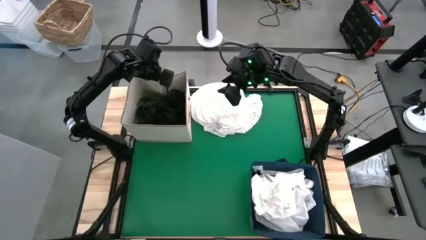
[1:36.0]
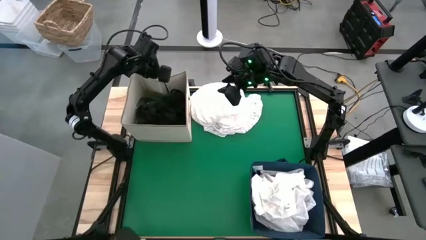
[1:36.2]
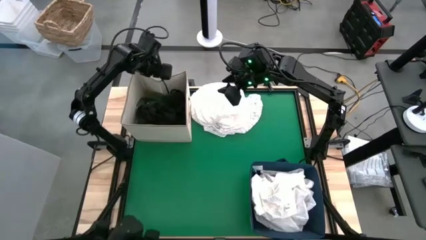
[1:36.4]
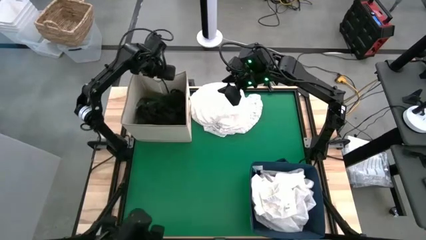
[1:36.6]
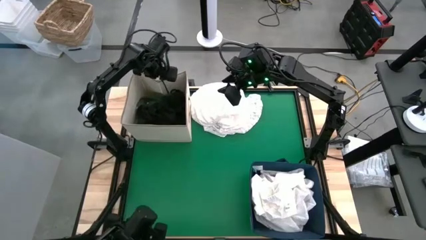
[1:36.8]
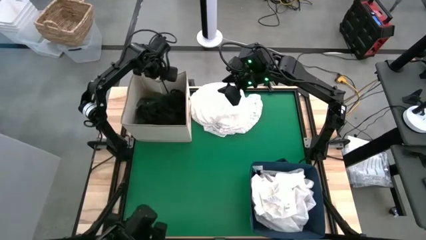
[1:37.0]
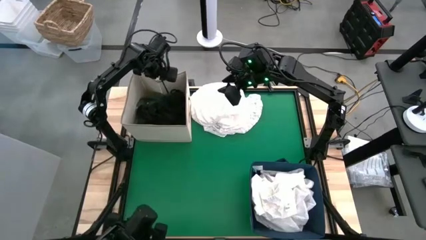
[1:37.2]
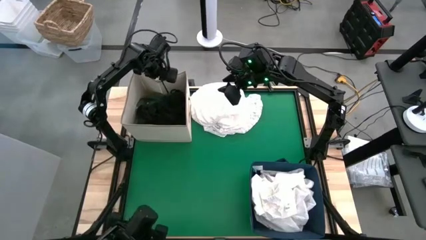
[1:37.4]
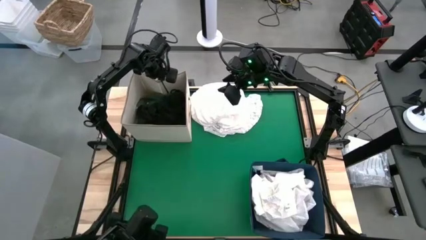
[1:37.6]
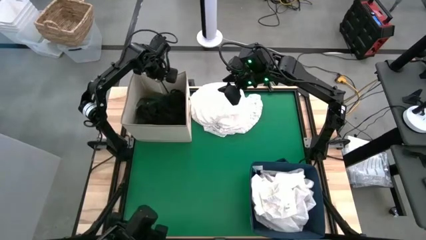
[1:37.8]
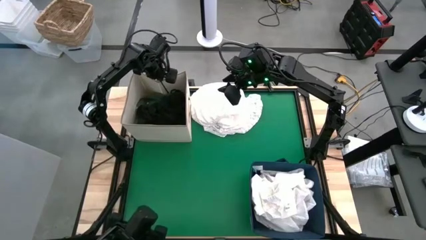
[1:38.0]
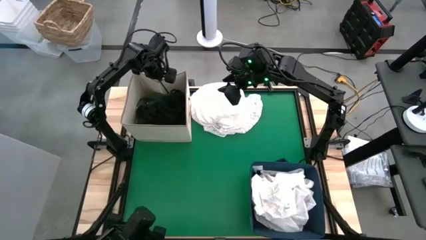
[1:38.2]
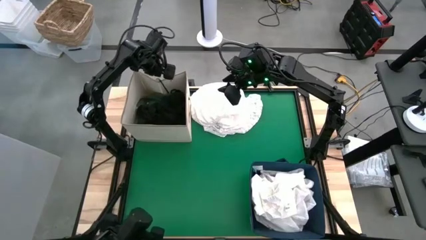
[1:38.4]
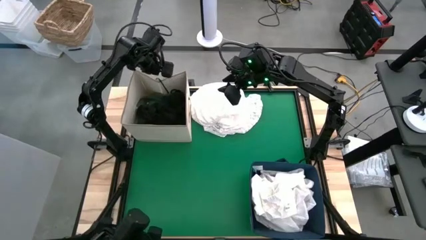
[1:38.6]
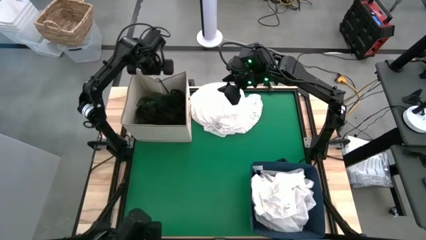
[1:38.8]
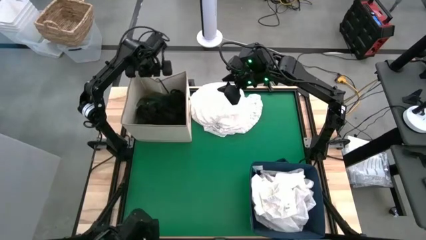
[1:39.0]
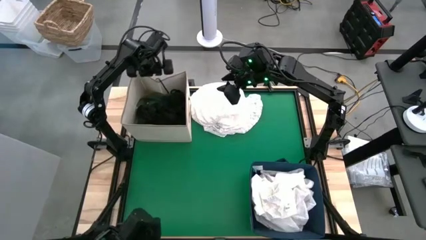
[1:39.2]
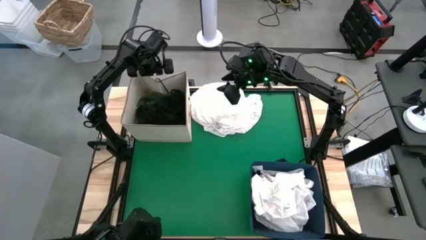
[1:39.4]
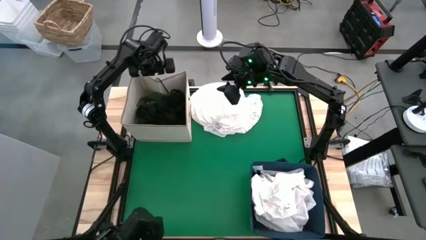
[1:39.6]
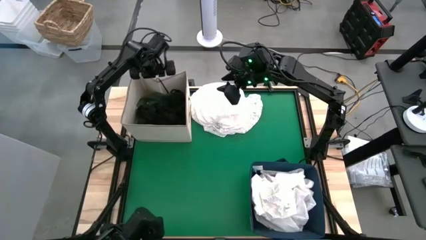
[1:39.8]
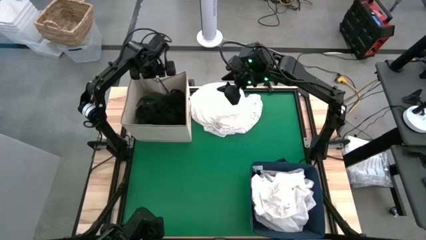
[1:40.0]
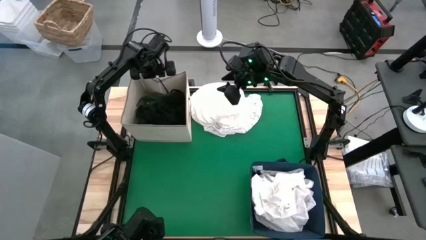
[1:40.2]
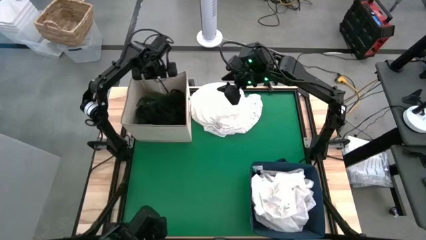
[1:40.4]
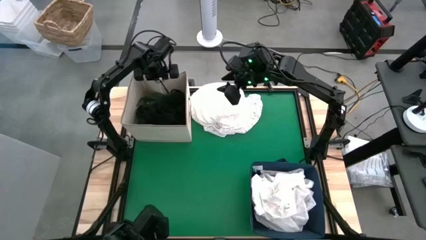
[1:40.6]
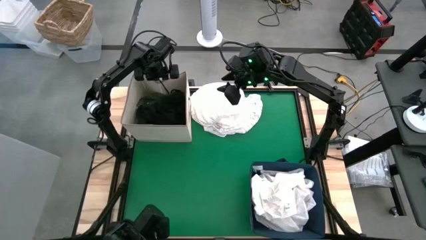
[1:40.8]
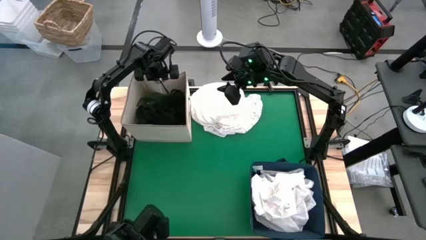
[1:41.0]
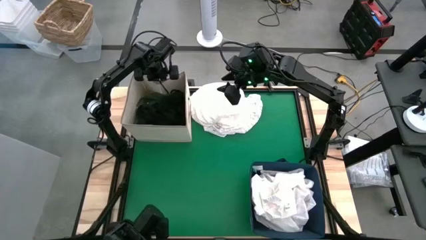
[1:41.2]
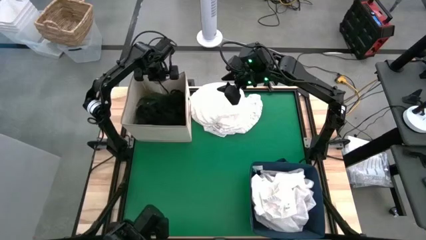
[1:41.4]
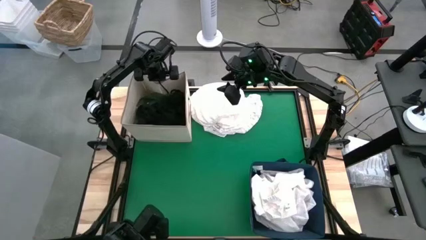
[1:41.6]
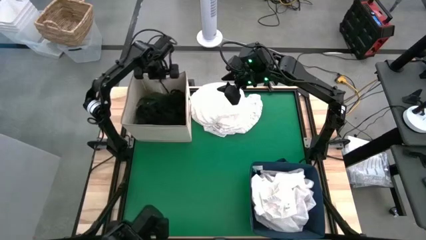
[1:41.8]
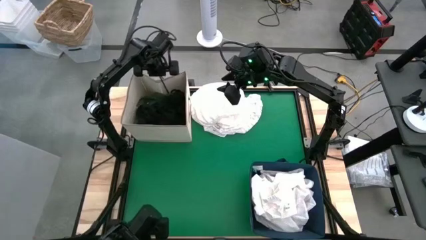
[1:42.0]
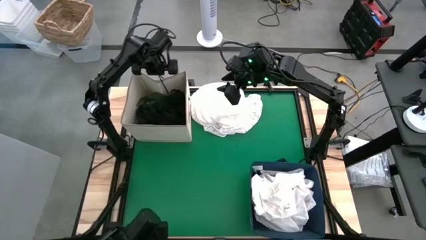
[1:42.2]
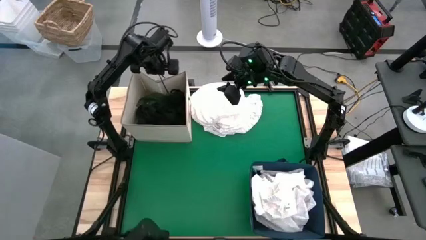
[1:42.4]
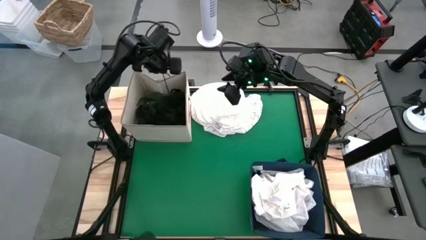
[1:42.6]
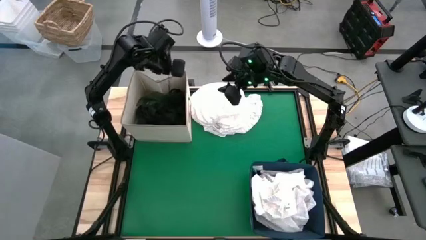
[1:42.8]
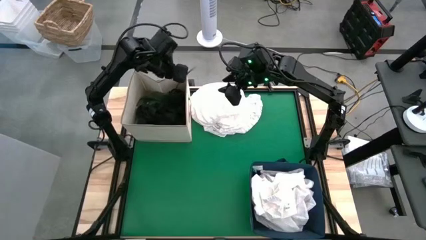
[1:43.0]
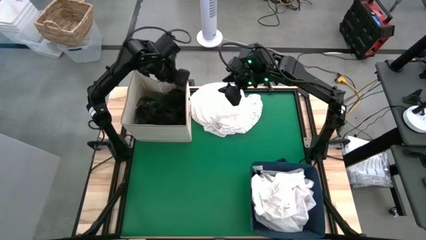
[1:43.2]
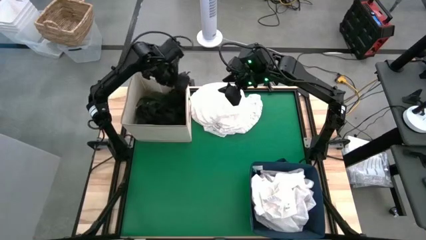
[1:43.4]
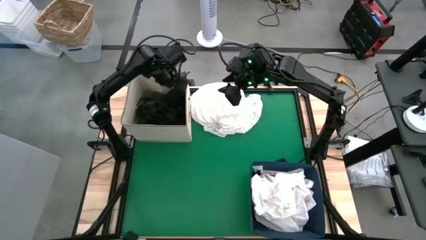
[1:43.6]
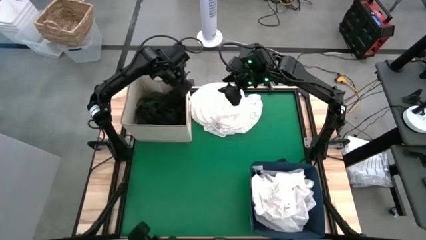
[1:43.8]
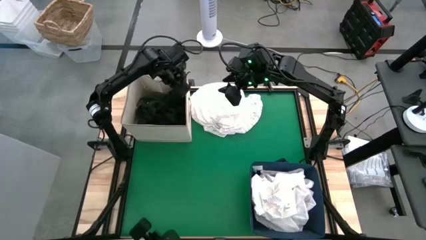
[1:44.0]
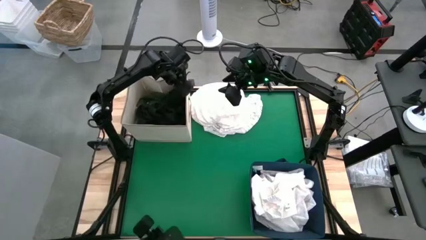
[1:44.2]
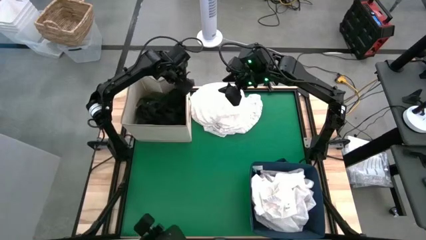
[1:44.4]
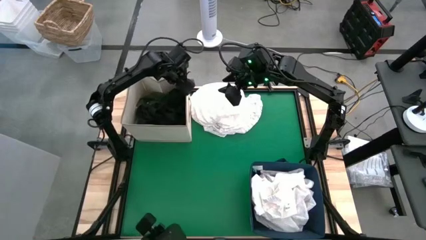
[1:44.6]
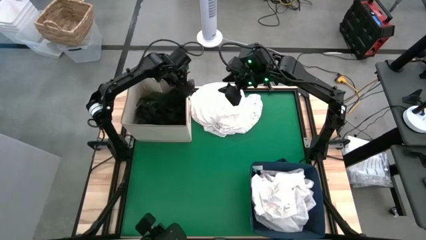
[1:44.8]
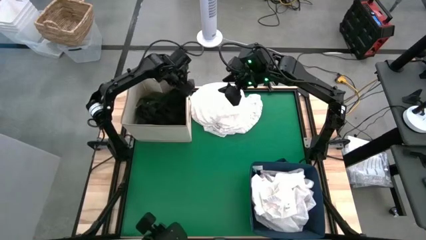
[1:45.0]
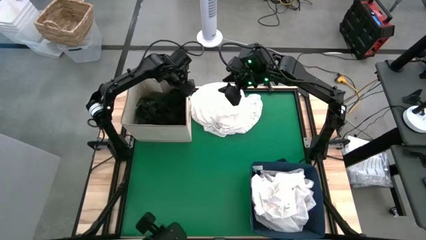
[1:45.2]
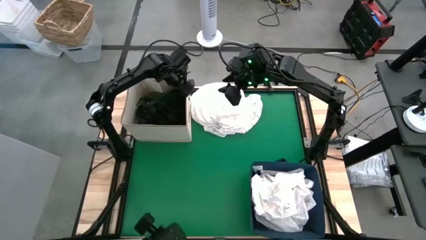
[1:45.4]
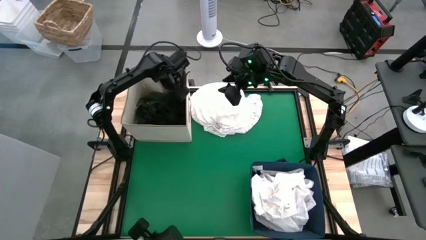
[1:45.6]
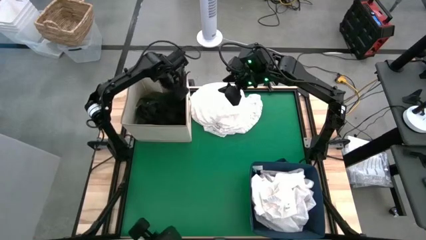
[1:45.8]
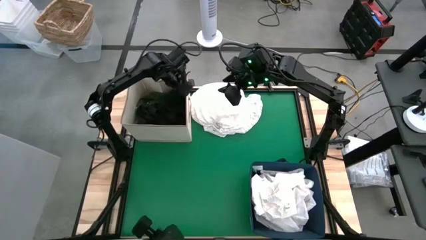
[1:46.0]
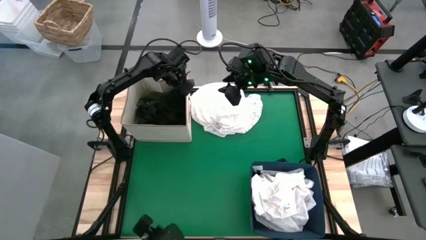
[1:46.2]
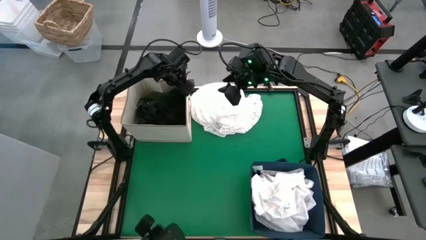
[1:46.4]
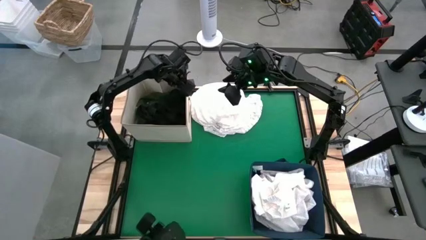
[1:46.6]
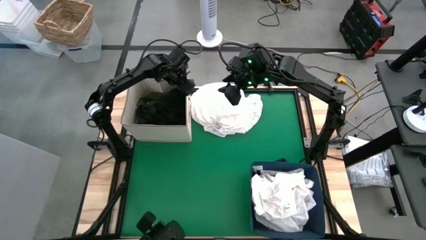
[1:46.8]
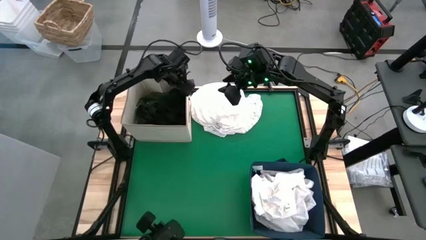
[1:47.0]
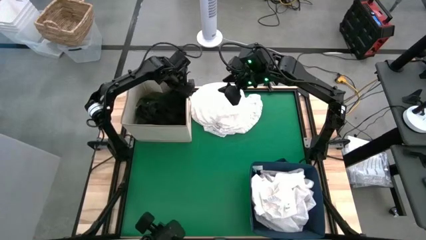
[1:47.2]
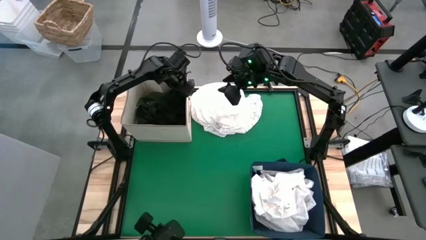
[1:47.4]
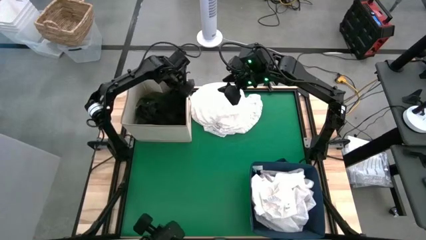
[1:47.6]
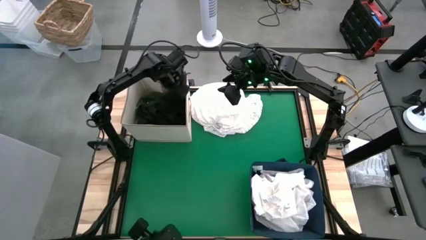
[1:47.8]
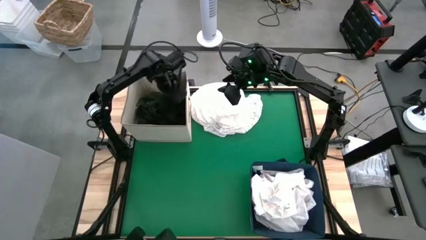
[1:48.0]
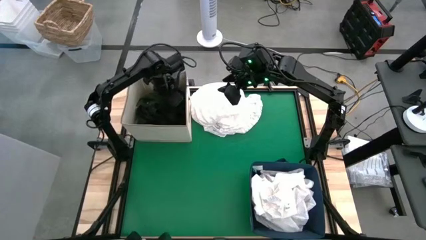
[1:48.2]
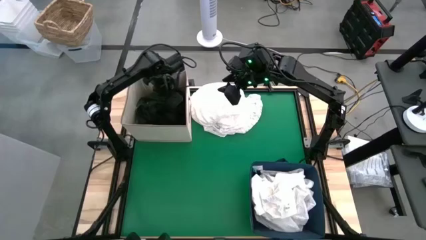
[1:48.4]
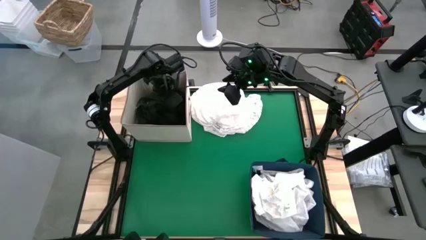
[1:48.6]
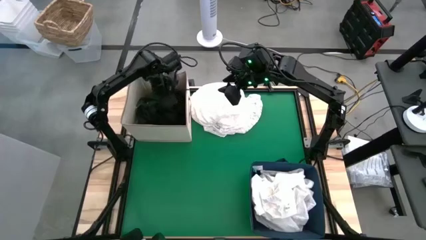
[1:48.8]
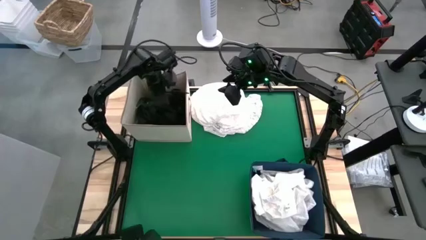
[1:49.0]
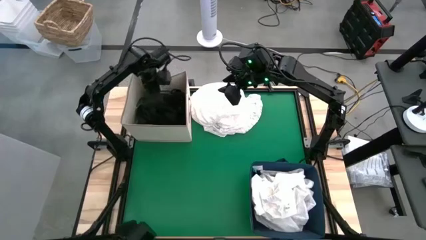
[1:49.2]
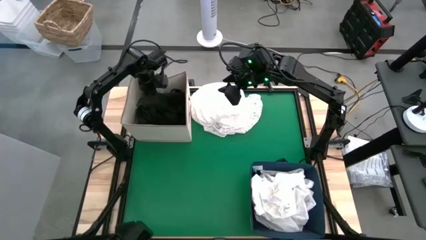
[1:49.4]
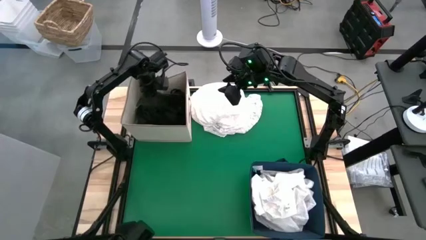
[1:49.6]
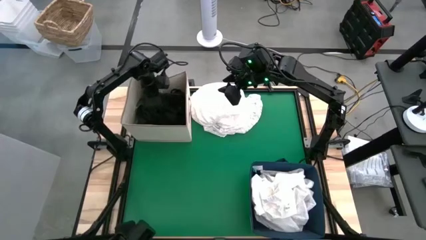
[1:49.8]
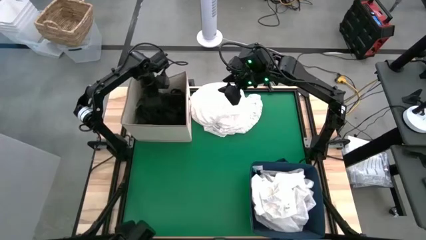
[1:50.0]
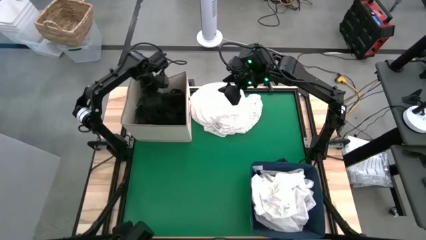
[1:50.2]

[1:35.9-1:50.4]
Put the black cloth into the white bin
